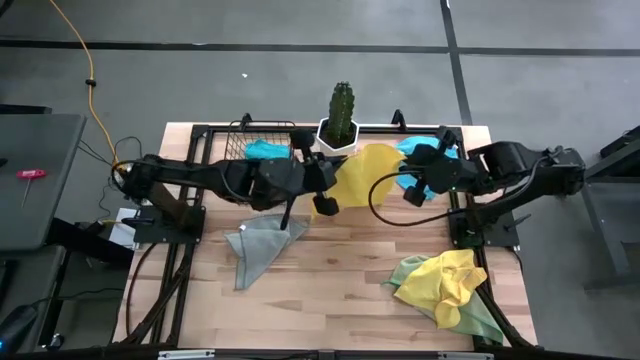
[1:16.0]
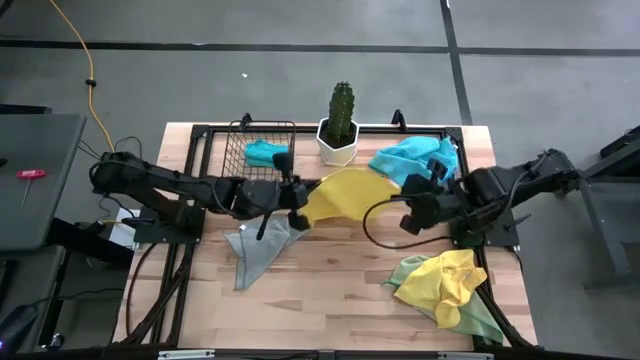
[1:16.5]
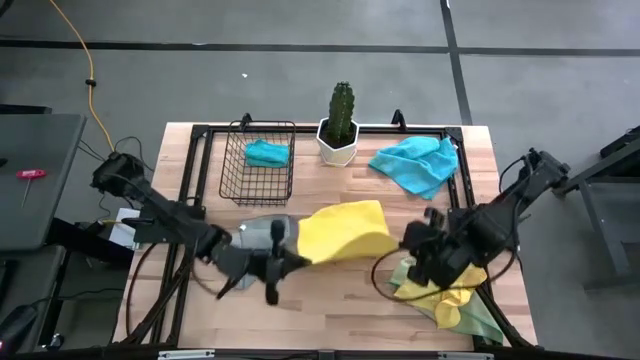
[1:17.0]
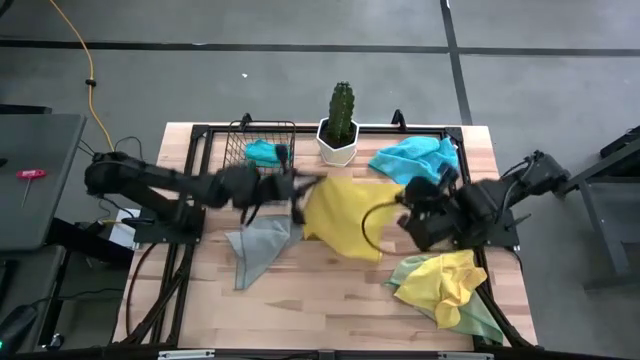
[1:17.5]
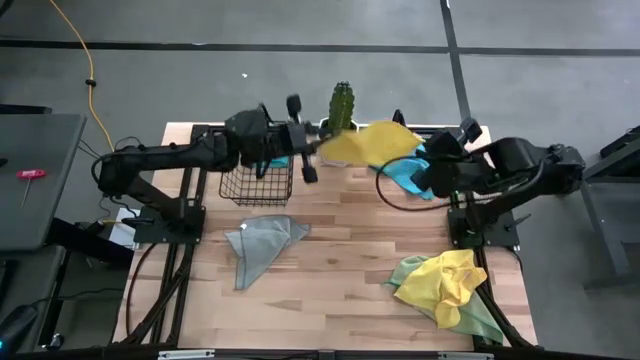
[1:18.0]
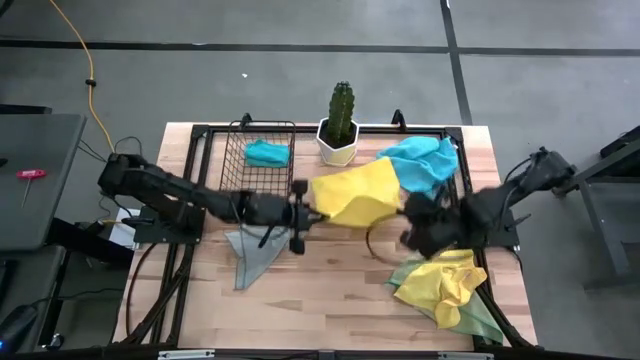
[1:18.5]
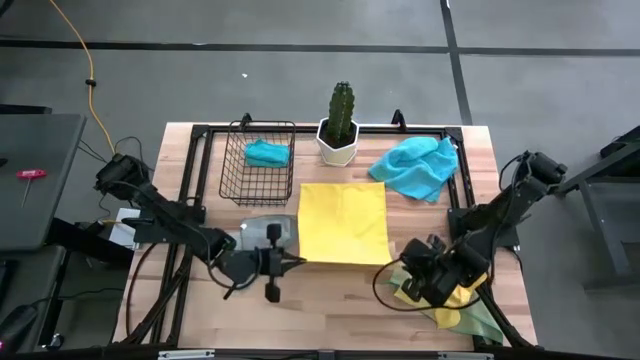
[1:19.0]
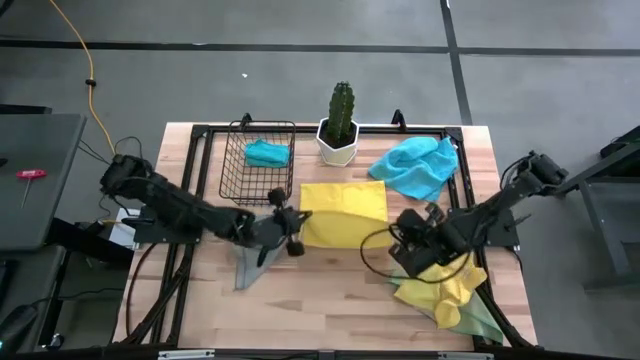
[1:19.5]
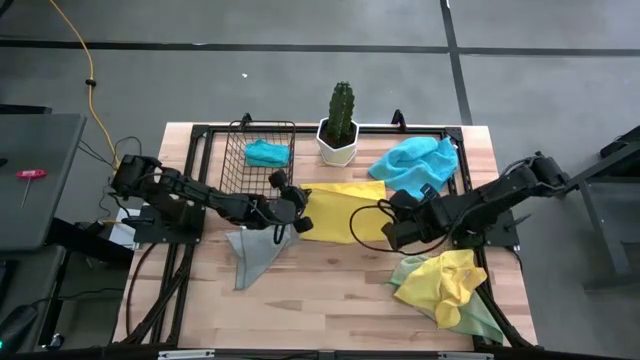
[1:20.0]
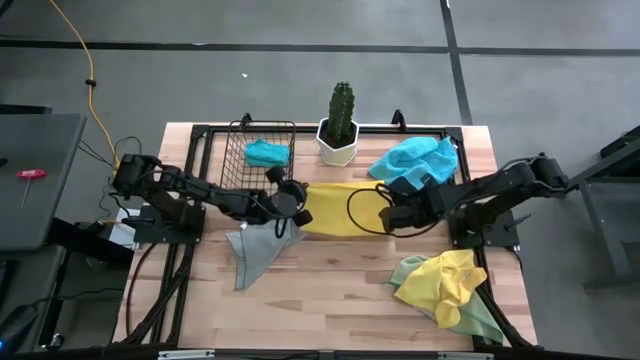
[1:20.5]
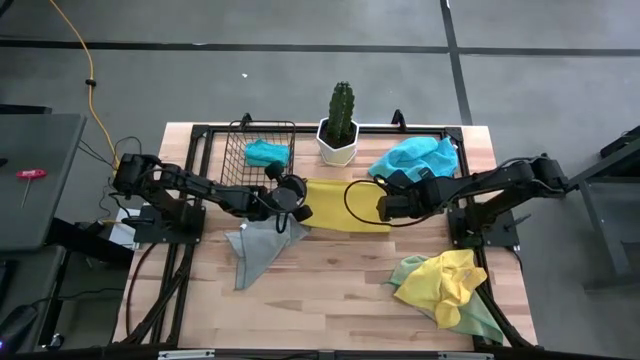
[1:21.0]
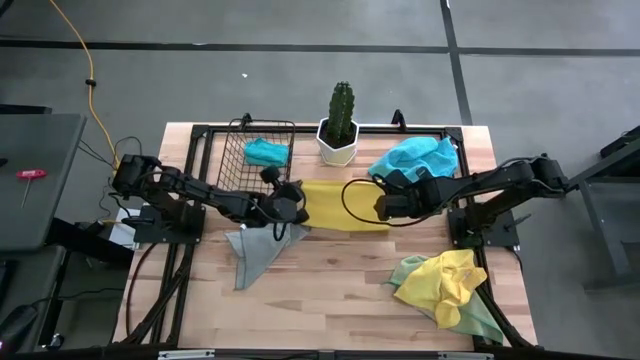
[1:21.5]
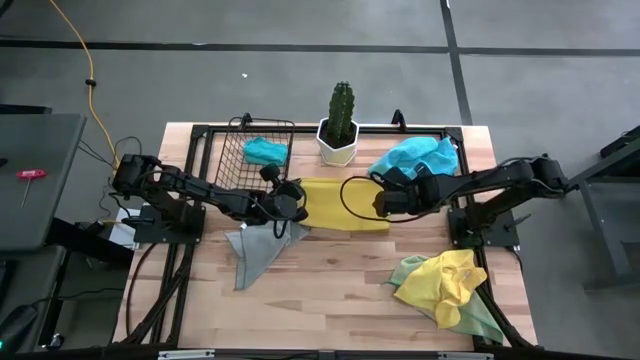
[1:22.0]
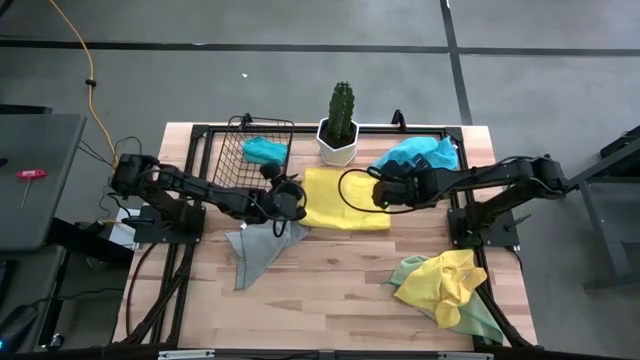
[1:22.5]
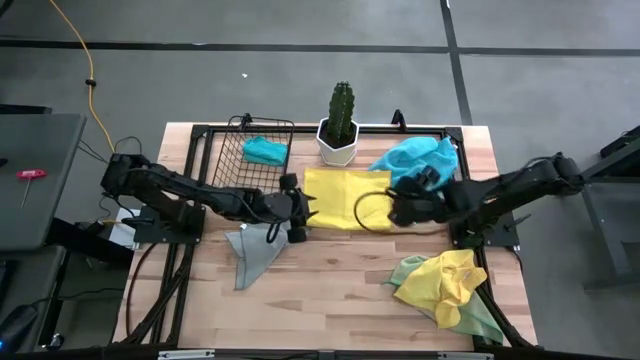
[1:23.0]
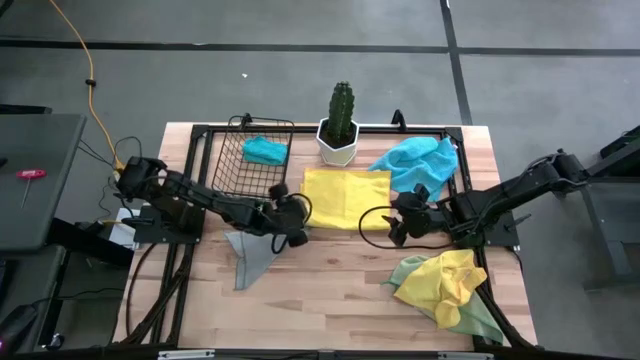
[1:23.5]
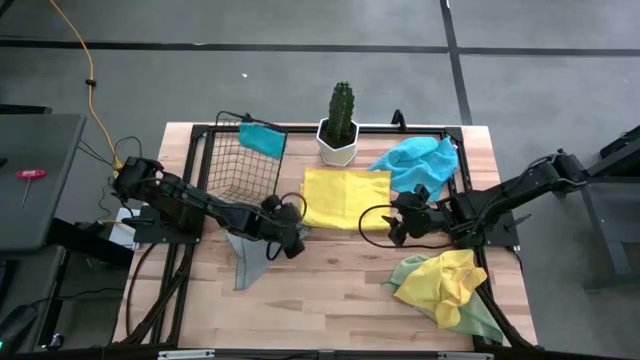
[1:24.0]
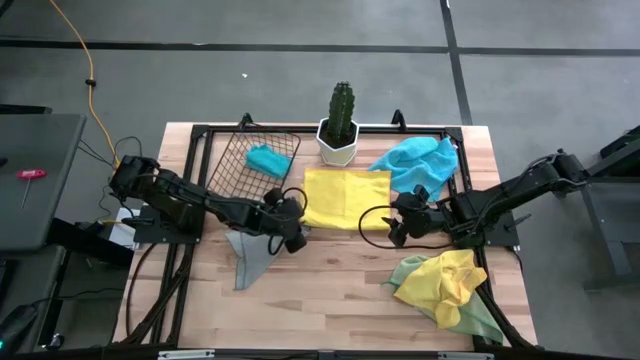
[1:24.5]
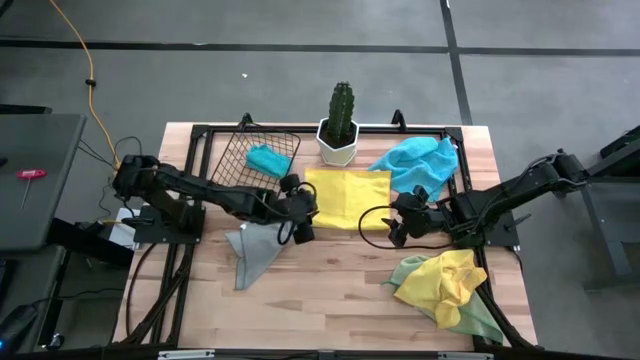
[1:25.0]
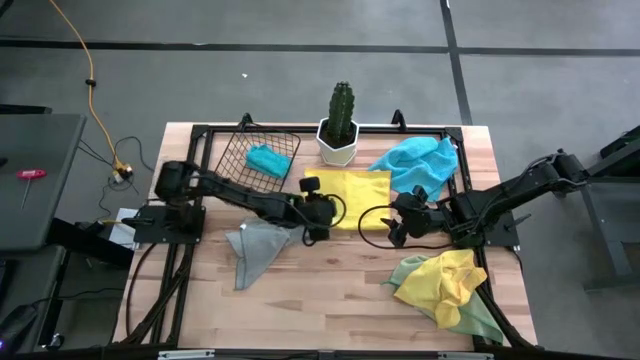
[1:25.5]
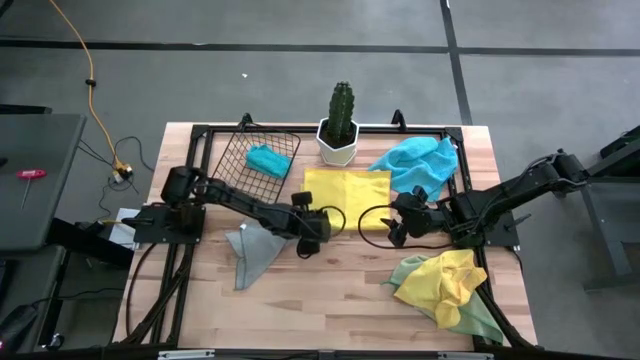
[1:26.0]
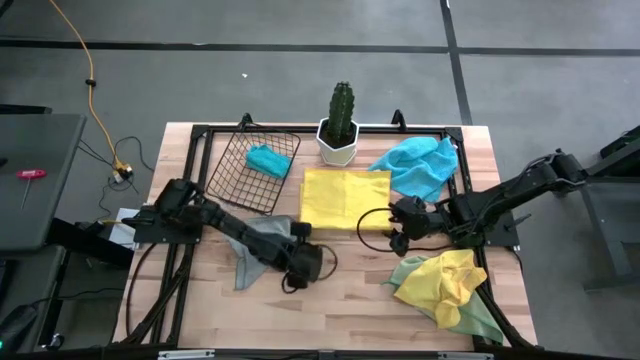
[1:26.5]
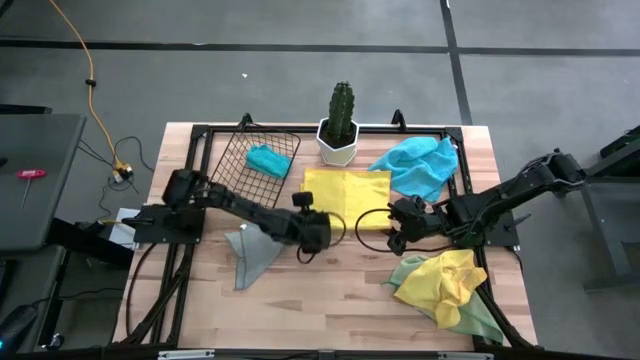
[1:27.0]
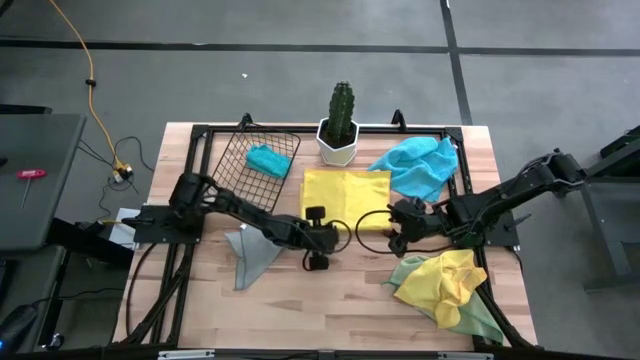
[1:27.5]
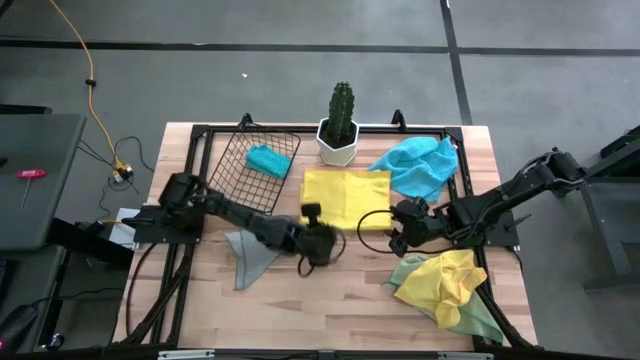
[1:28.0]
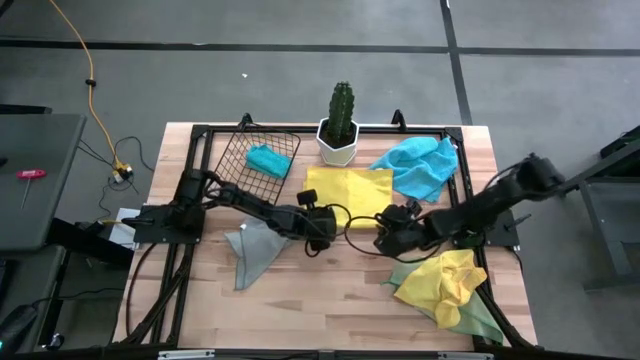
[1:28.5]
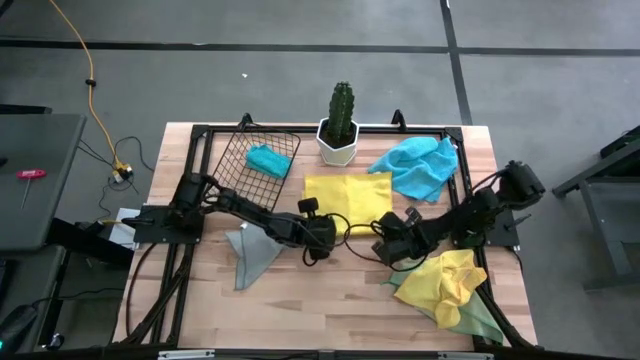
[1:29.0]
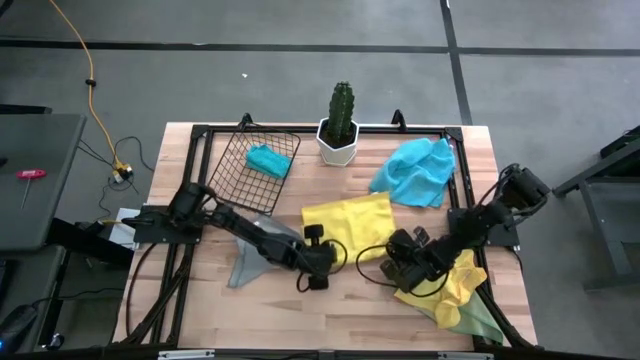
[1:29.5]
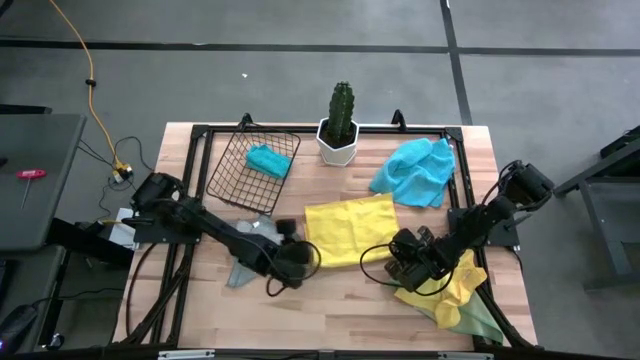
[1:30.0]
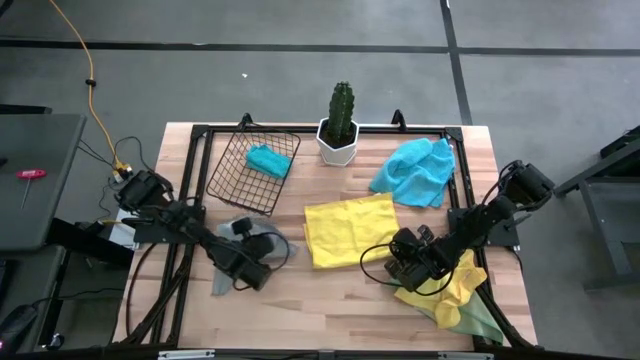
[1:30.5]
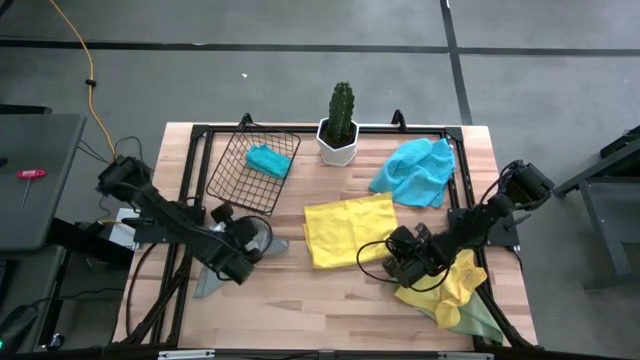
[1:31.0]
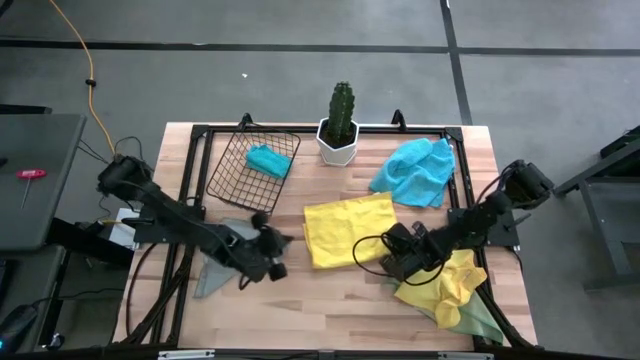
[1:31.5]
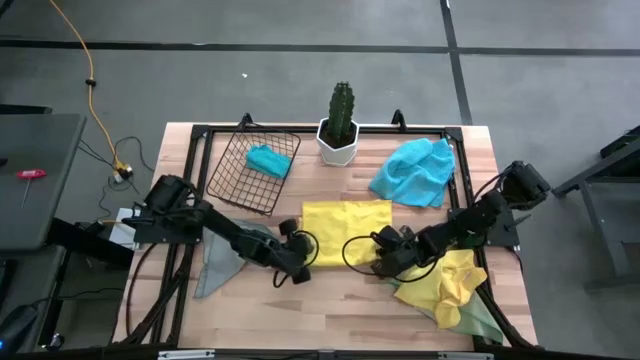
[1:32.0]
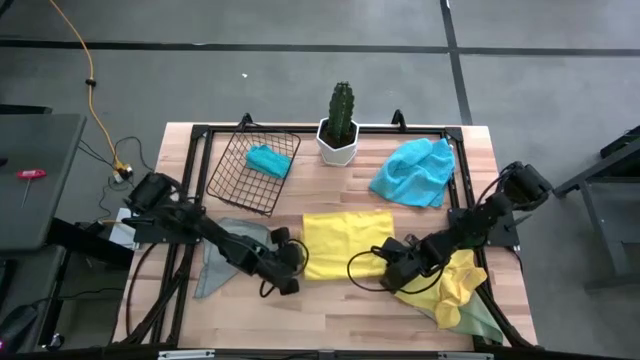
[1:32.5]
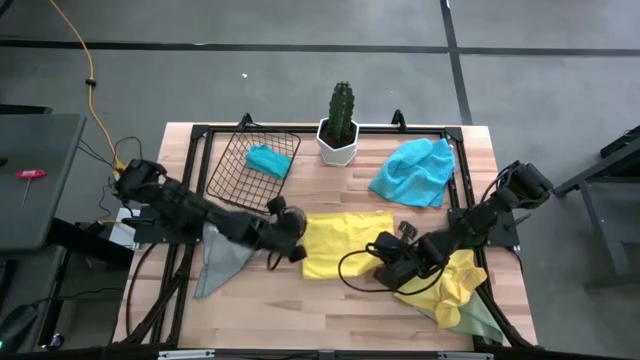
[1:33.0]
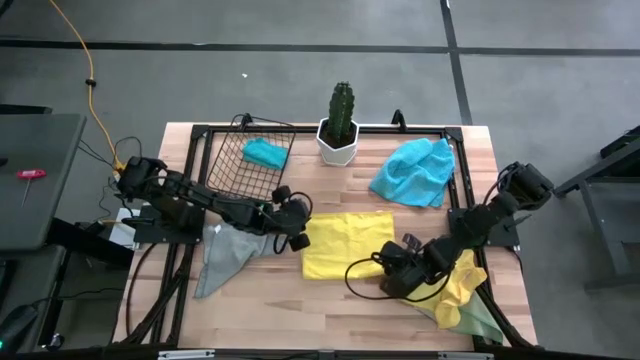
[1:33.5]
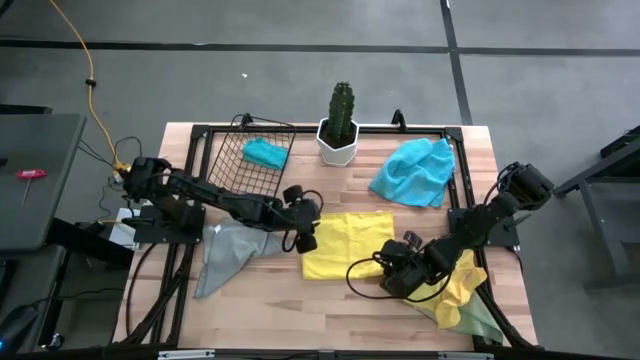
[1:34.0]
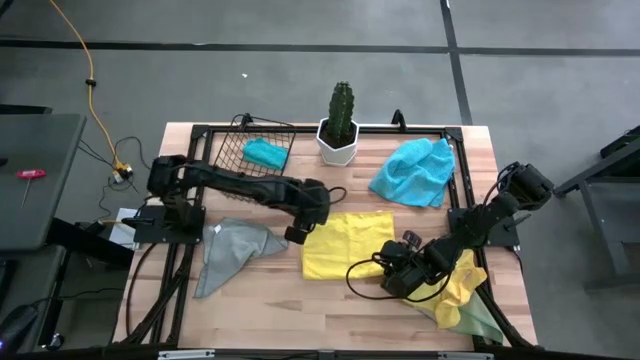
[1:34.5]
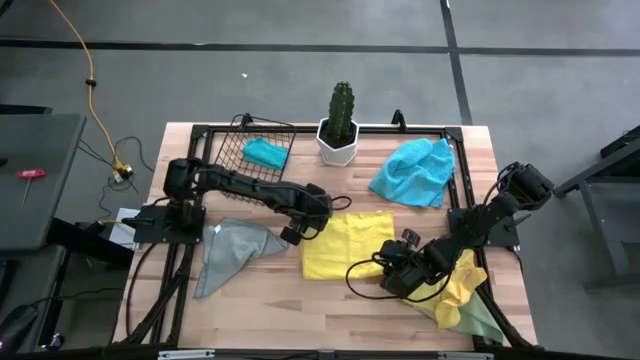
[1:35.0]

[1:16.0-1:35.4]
Task: Fold microfiber towels
Fold the left yellow microfiber towel on the table

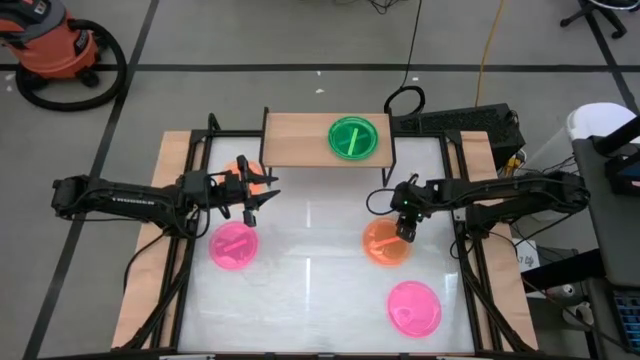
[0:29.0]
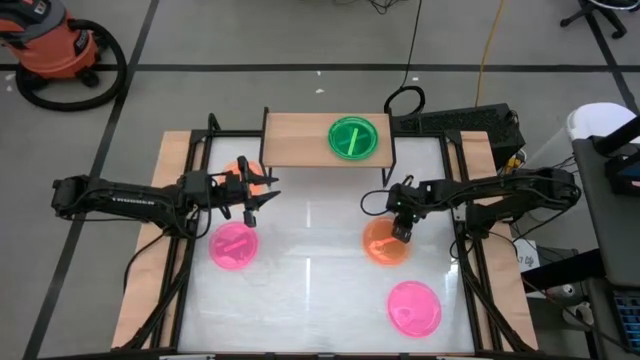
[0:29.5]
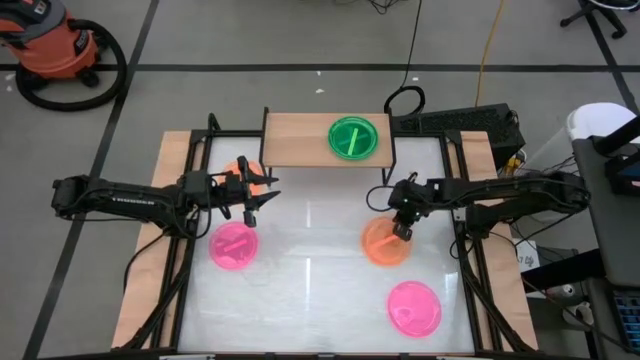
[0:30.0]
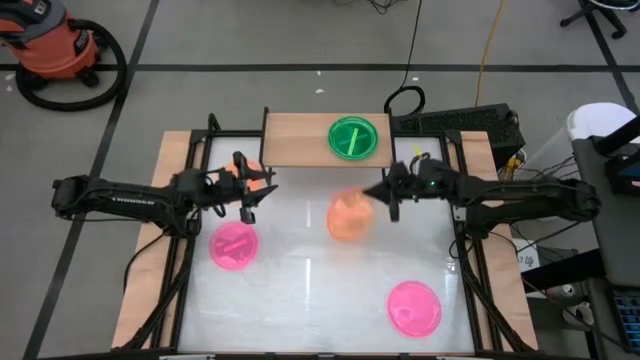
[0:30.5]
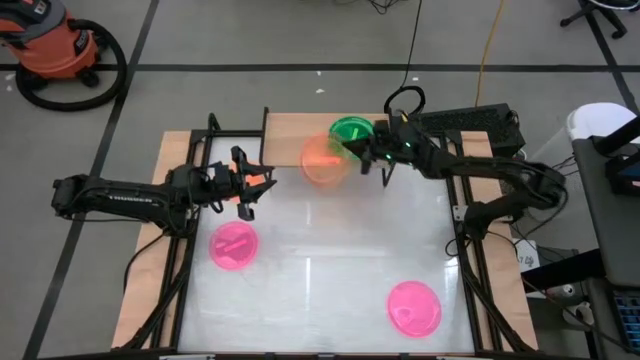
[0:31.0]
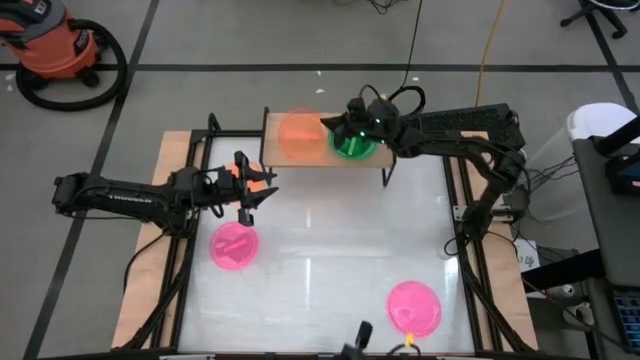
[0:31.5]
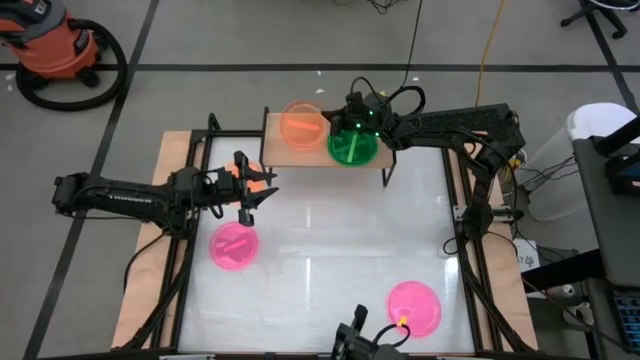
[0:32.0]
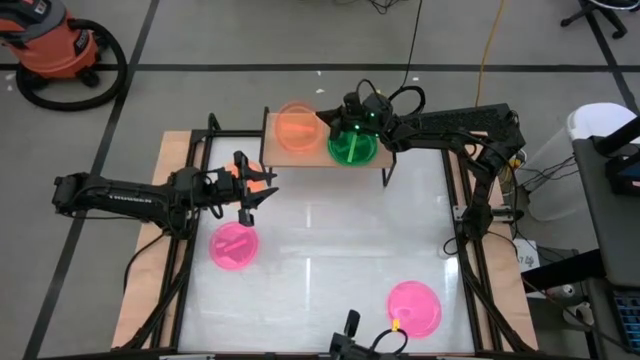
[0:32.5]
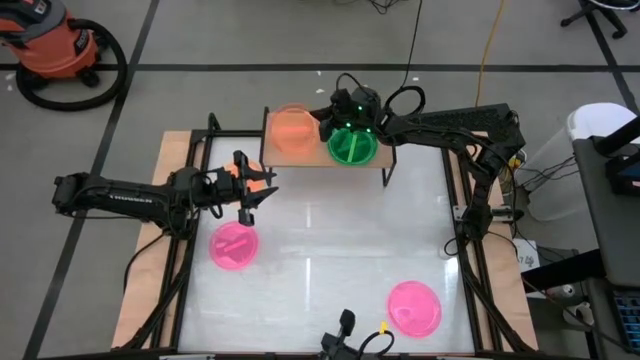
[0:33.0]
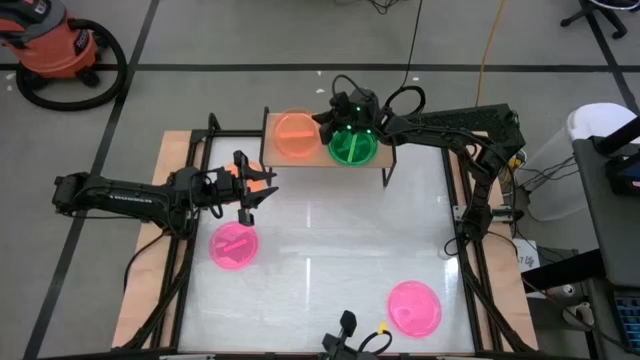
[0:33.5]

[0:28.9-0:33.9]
Task: Place and stack plates onto a shelf
Put the right orange transparent plate on the shelf
